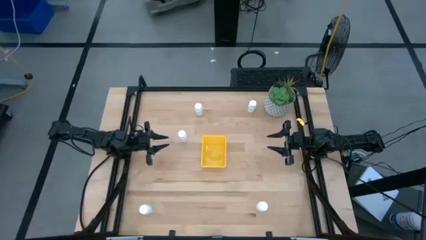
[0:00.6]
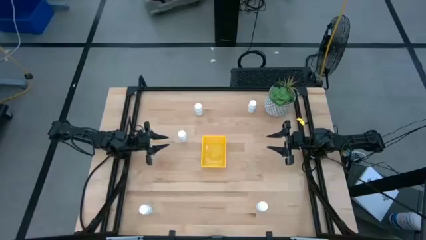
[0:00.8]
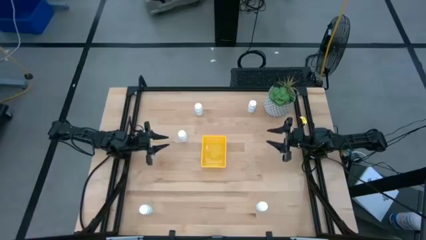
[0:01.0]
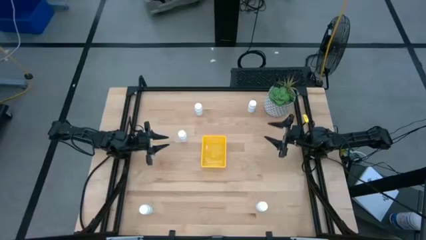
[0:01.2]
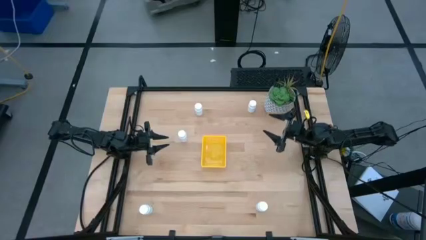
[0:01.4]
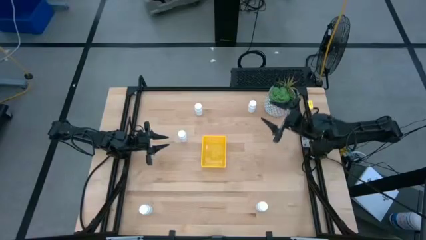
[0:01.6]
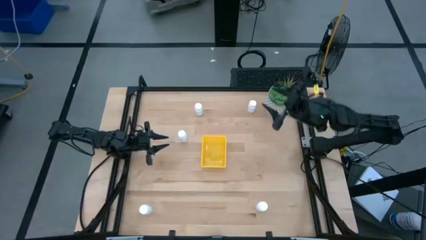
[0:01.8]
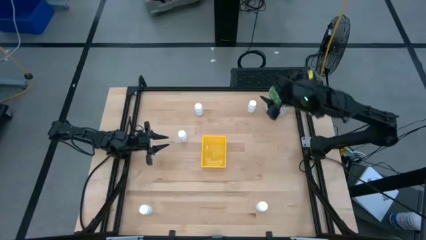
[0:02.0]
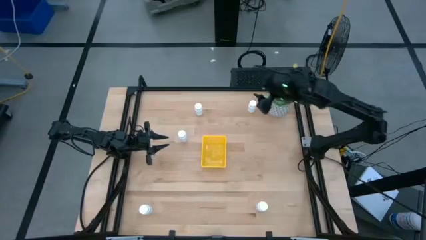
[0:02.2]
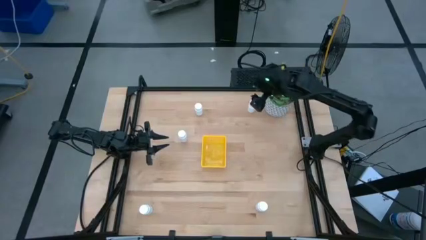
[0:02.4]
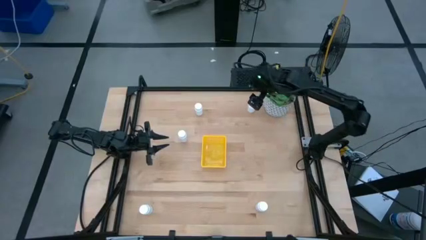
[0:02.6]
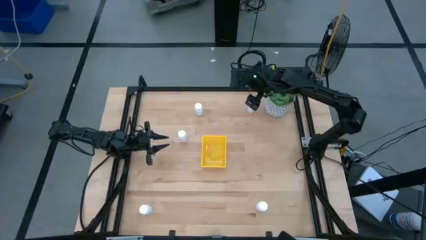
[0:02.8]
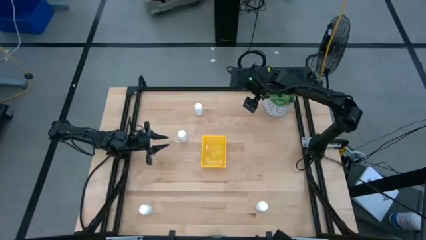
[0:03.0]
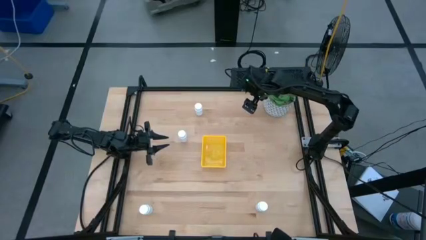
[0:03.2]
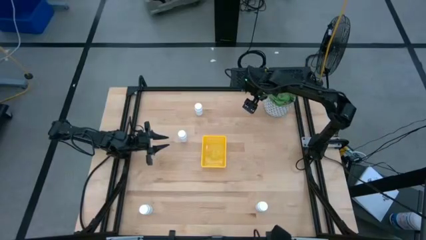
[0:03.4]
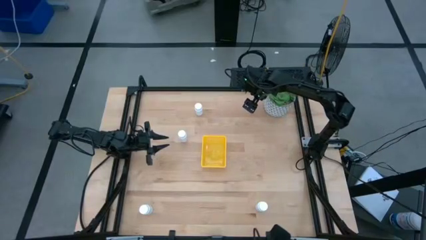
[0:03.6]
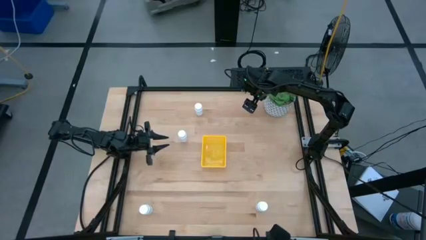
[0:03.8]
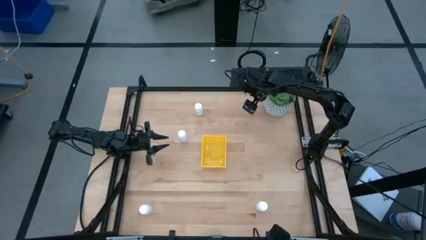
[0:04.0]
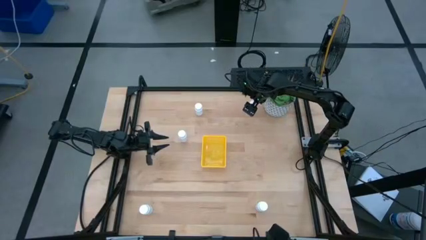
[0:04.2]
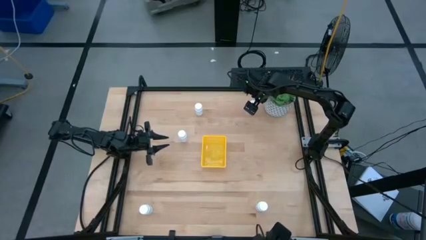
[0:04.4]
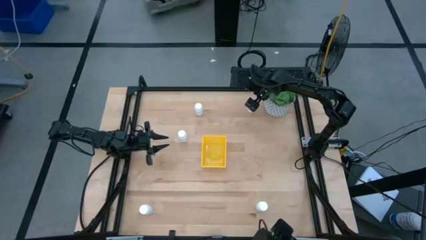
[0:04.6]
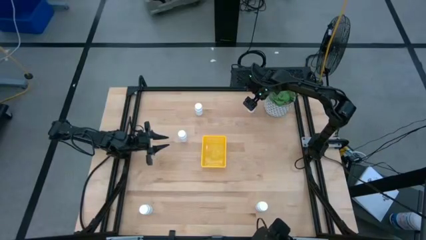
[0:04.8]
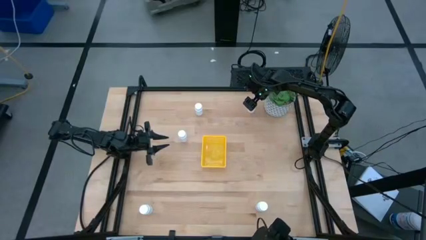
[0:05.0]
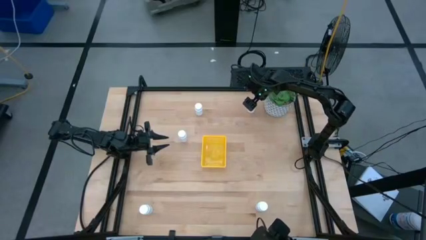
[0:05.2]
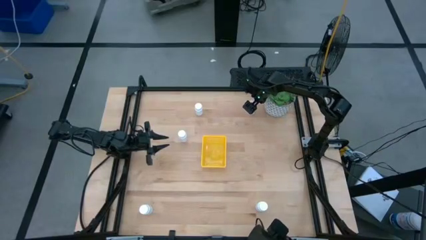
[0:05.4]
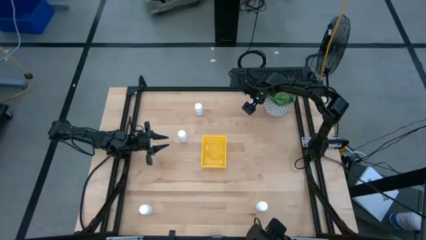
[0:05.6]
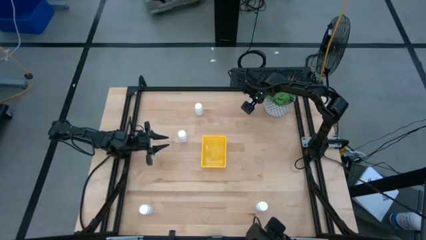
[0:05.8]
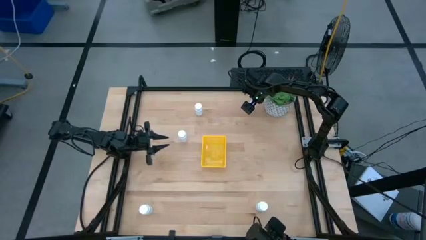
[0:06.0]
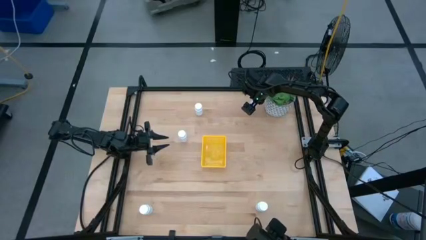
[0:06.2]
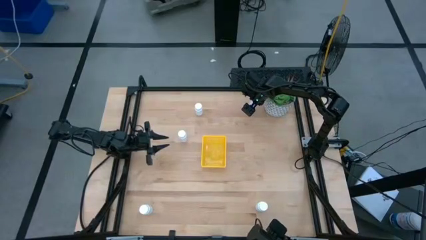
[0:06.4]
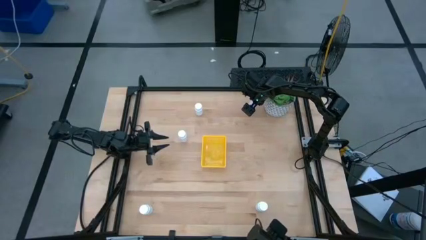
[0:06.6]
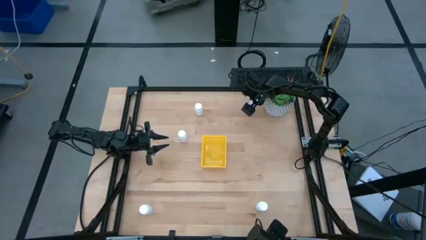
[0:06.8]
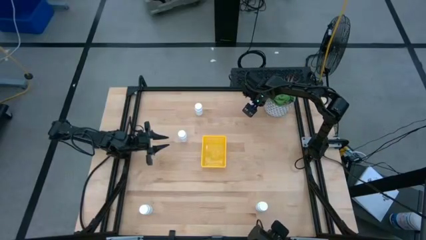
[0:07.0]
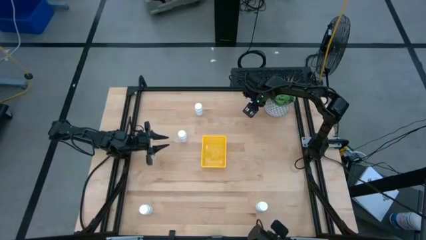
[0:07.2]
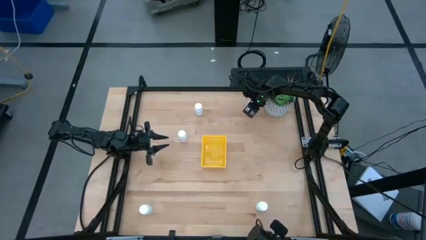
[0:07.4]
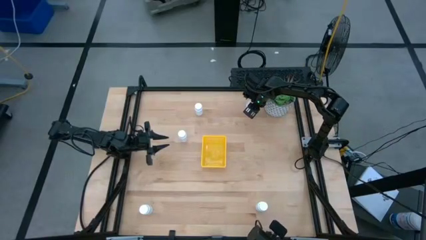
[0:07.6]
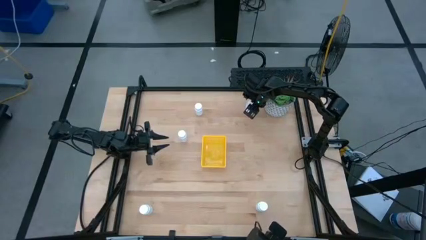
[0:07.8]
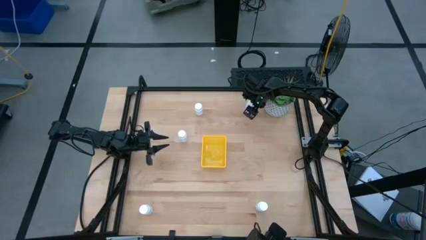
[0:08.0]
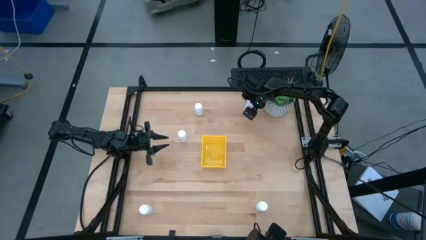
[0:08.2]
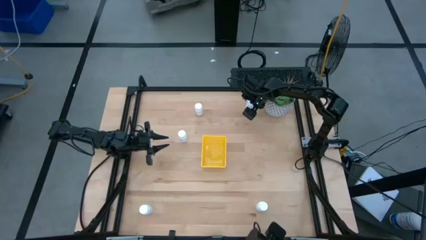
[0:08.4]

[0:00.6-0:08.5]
Task: Pick and place pill bottles into a basket
Put the white pill bottle into the yellow bin

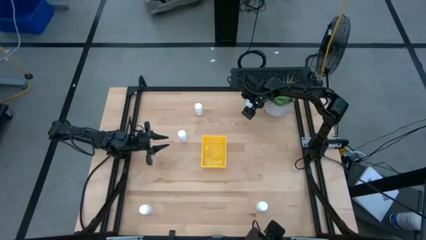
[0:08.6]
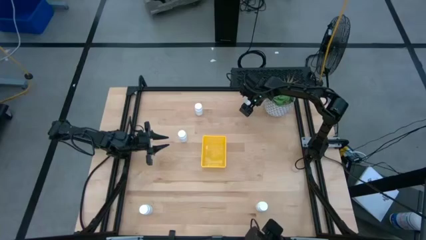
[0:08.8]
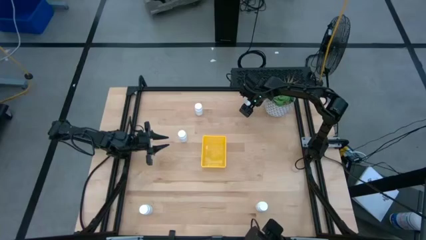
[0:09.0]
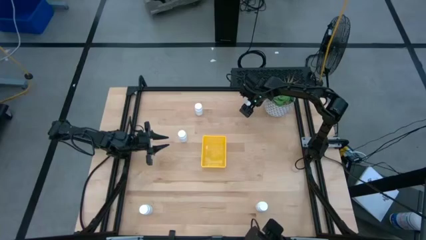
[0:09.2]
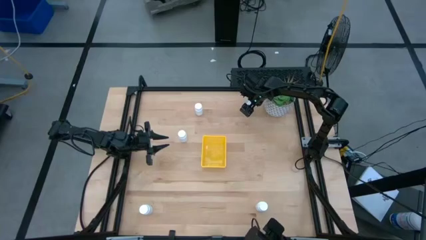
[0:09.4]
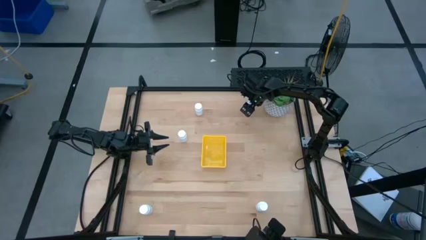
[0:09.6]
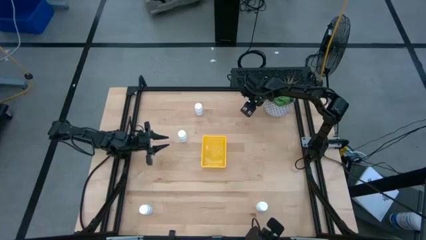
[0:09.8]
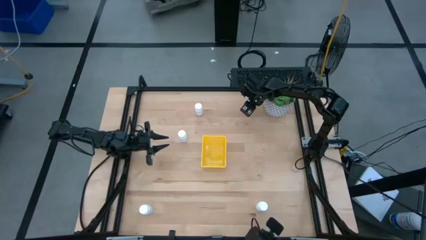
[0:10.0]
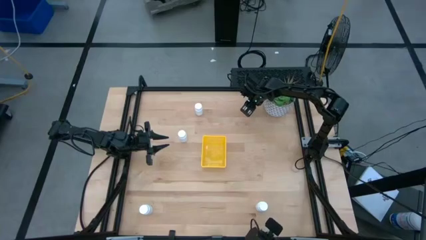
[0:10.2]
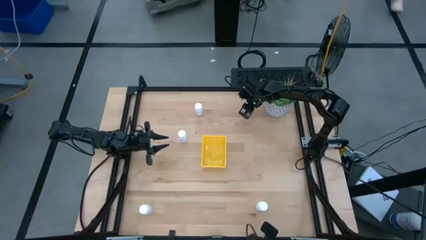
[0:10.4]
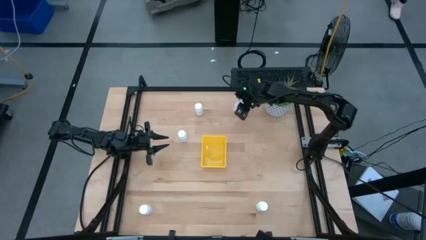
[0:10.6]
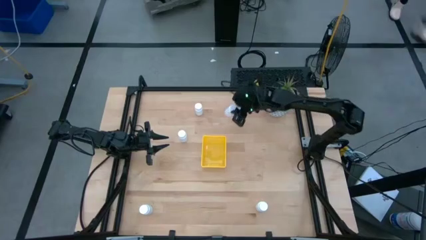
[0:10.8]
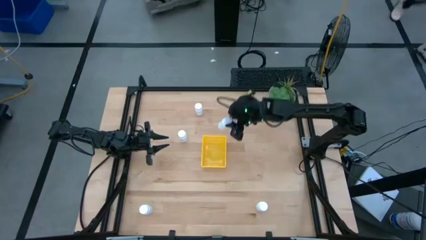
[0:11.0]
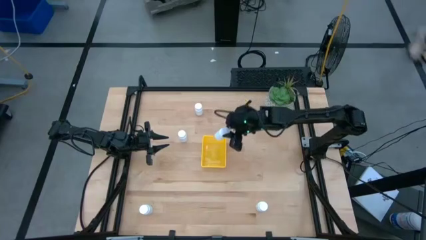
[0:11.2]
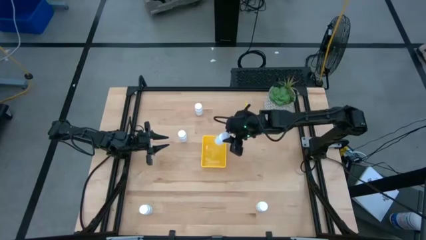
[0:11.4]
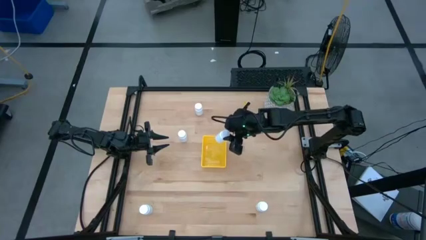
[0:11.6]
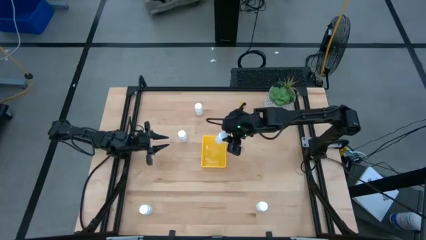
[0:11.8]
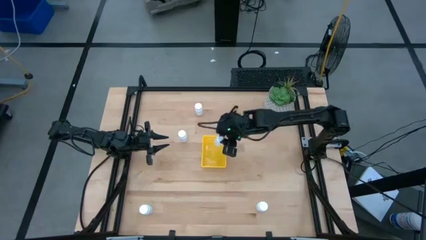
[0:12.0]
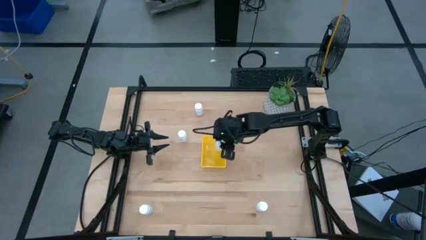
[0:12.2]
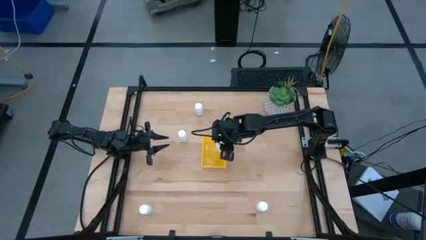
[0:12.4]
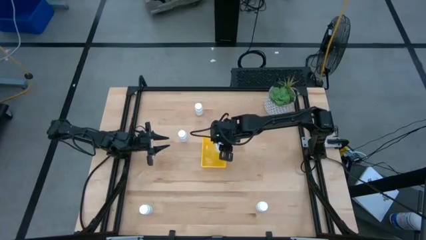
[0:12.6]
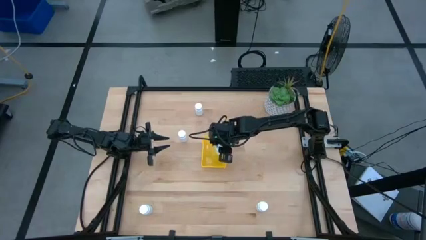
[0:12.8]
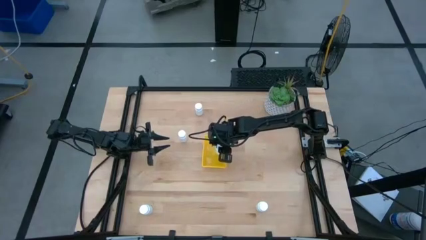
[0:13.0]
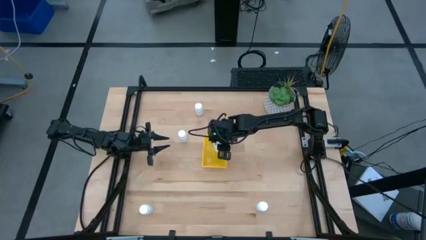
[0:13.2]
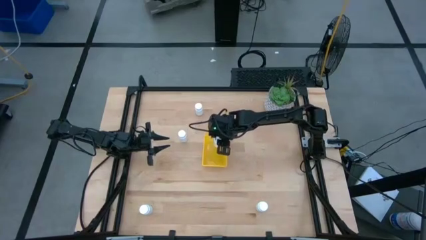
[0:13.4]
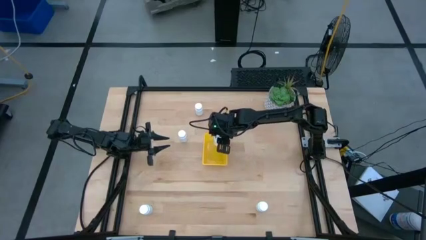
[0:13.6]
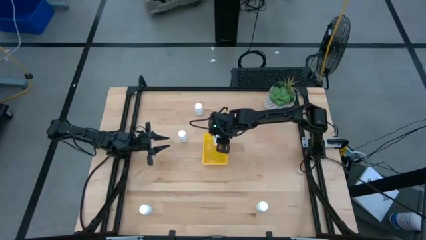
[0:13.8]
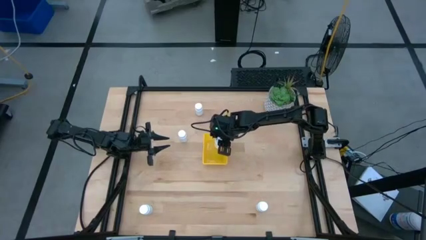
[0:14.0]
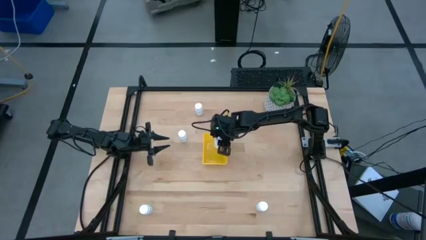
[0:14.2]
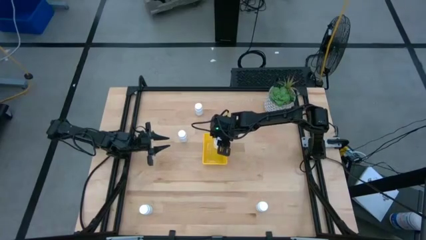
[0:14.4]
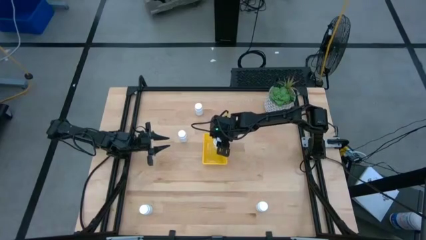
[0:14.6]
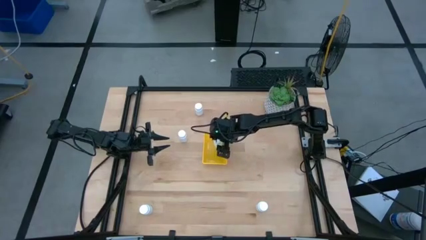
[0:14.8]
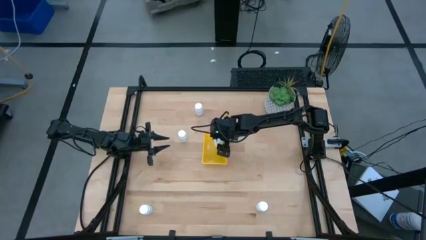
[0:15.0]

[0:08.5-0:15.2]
Put the white pill bottle into the yellow bin

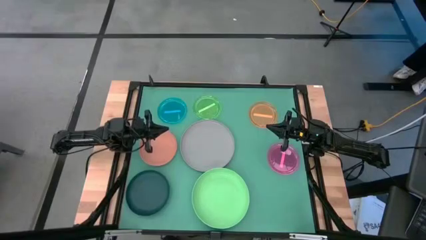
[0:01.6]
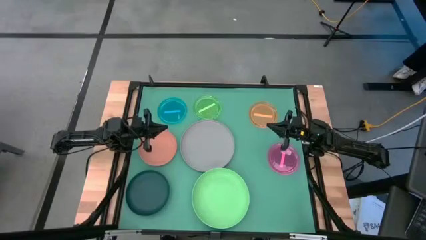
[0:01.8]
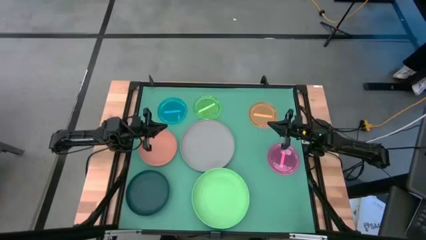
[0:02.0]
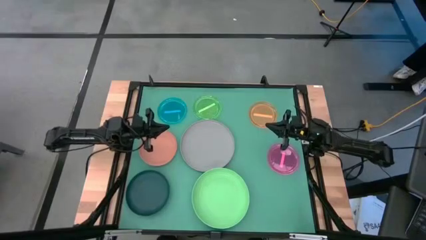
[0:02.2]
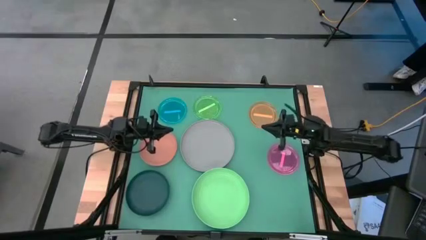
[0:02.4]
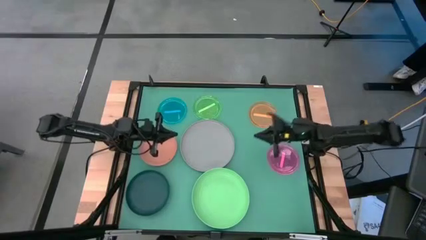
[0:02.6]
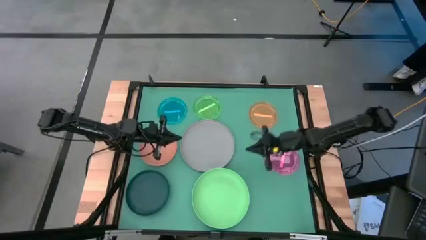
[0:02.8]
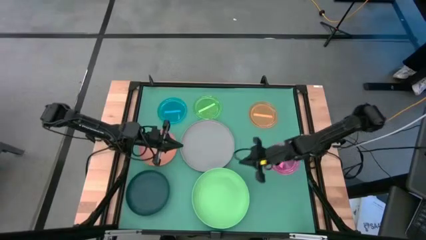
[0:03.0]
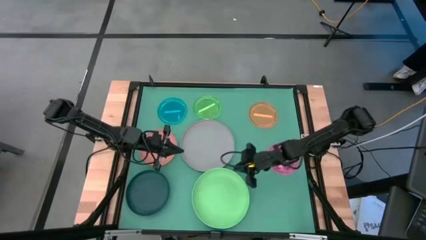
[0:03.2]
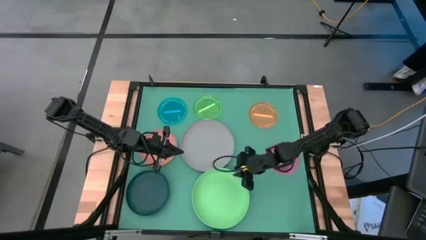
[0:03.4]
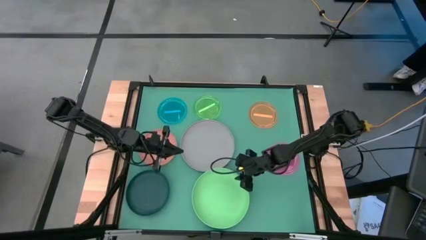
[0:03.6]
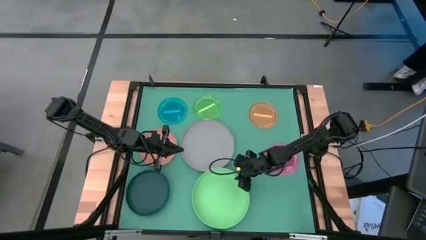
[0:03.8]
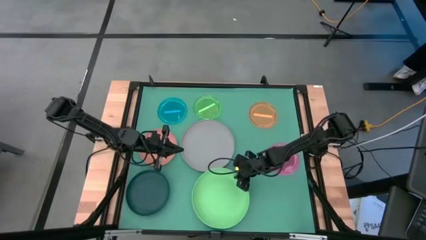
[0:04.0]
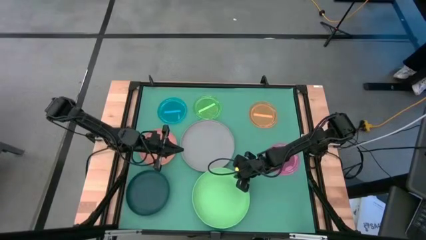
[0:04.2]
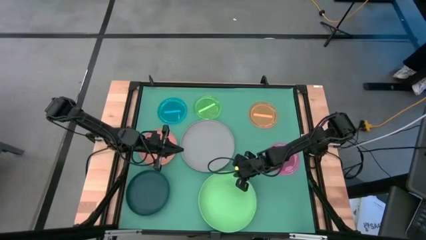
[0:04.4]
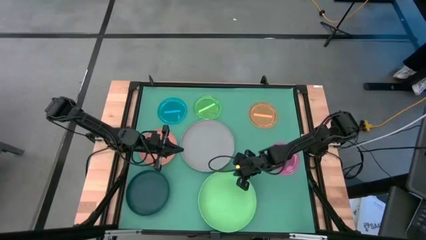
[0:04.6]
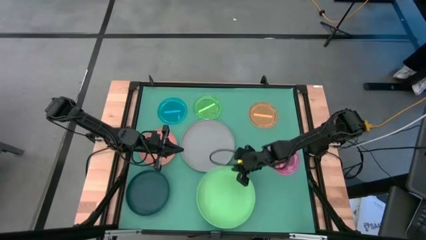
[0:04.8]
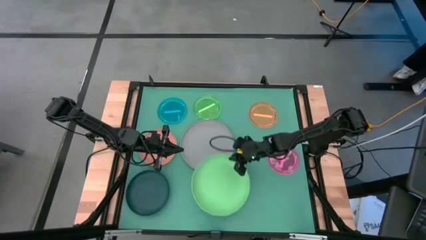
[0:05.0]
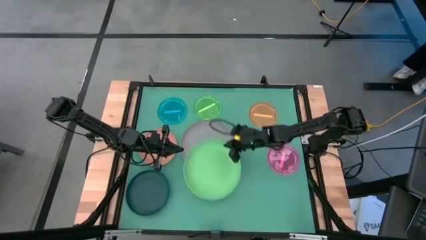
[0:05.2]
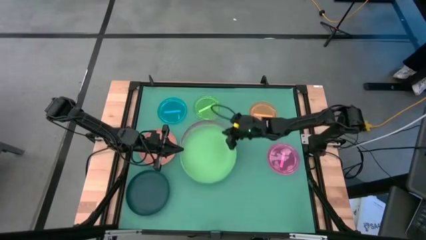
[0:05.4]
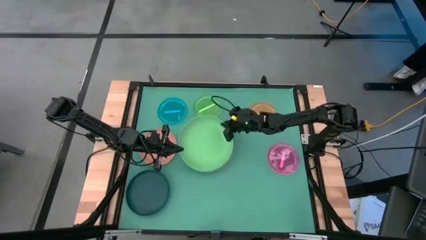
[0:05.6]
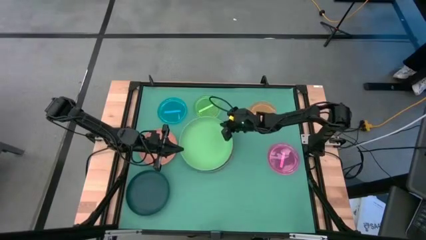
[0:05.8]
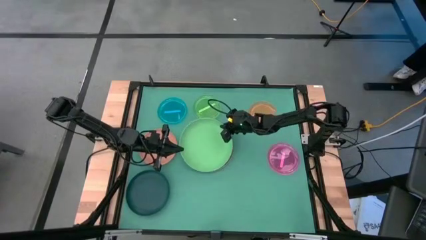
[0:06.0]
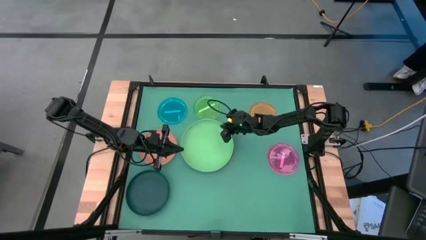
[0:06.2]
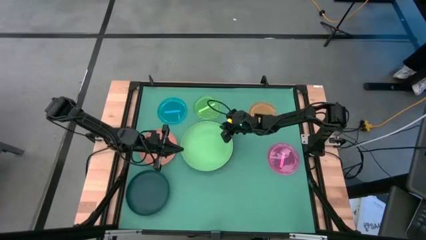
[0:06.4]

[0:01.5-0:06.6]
Task: Stack plastic plates
Stack the light green plate on top of the gray plate
